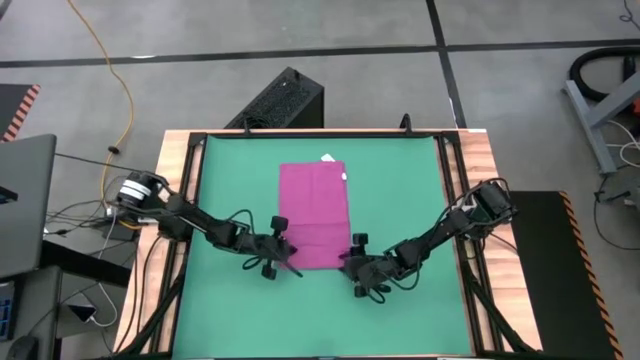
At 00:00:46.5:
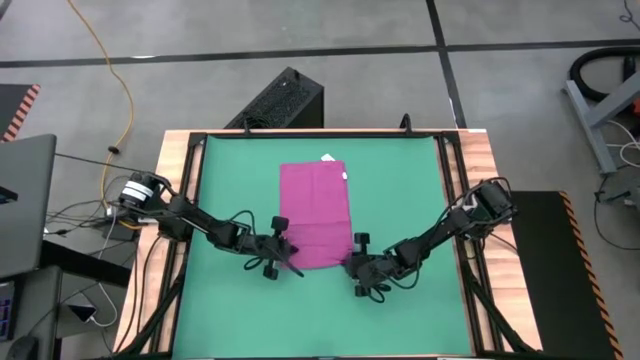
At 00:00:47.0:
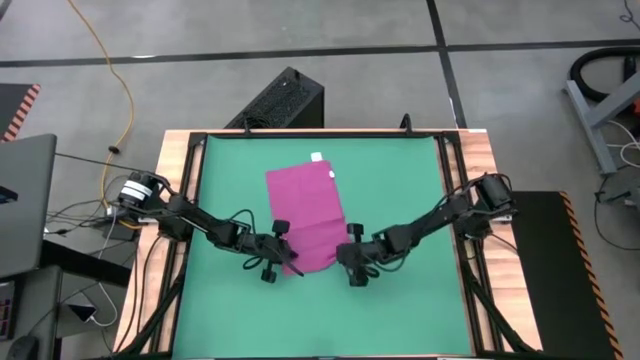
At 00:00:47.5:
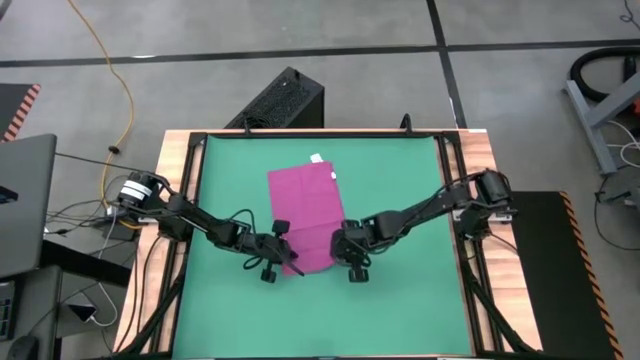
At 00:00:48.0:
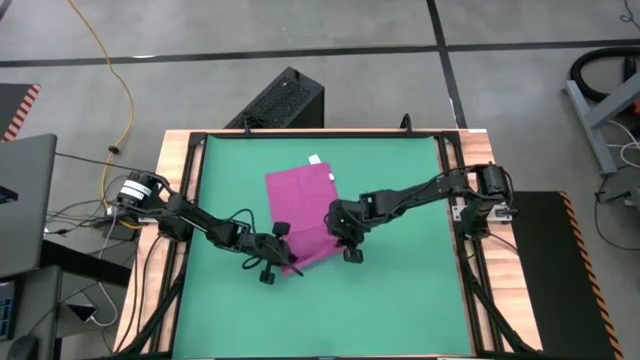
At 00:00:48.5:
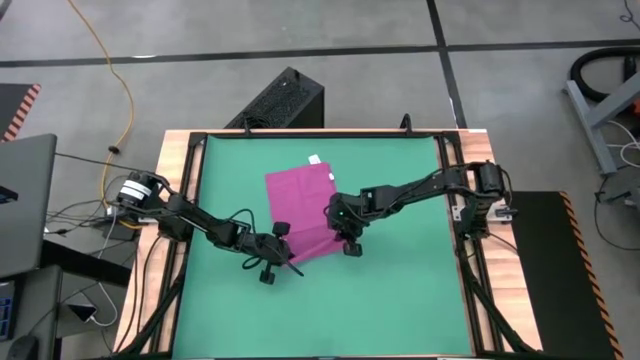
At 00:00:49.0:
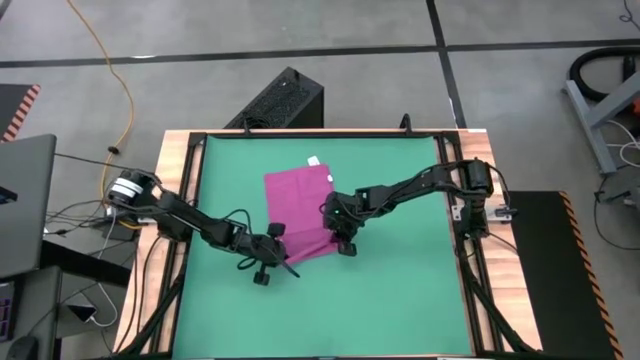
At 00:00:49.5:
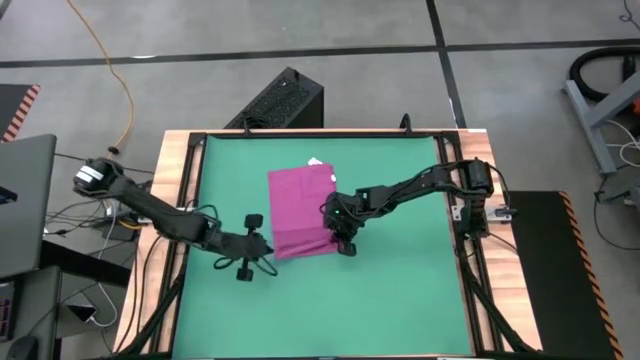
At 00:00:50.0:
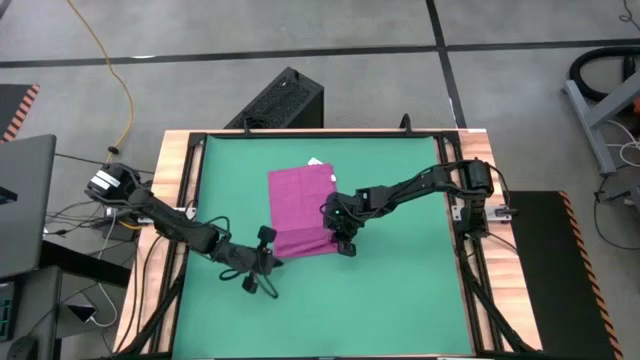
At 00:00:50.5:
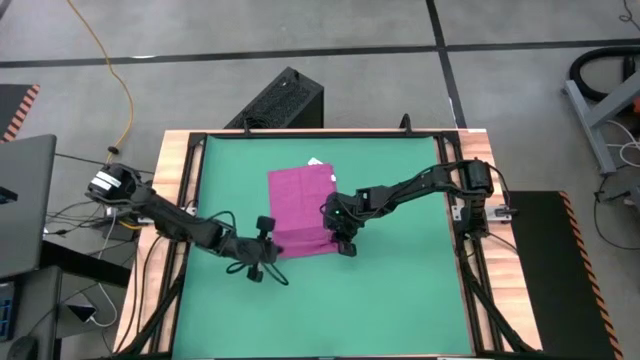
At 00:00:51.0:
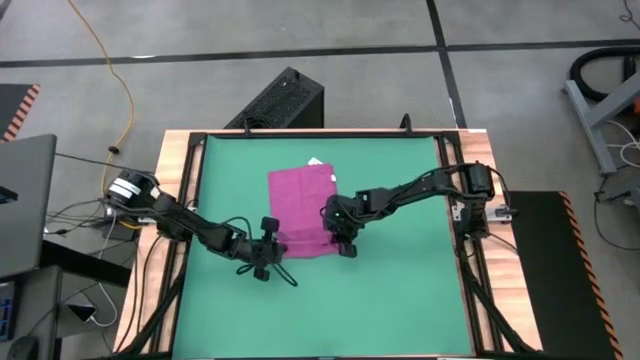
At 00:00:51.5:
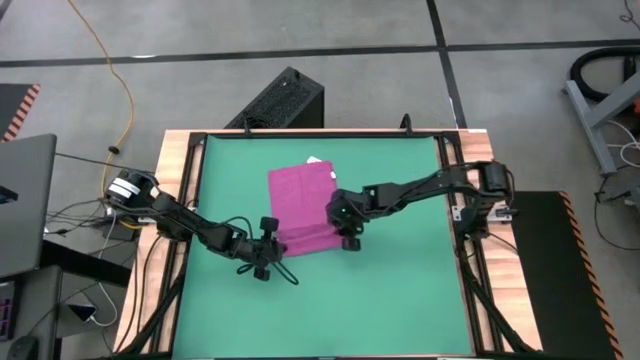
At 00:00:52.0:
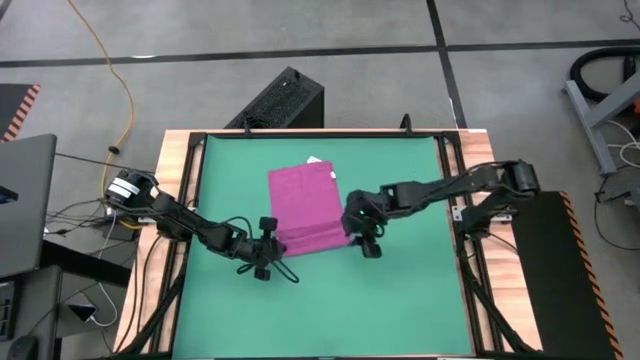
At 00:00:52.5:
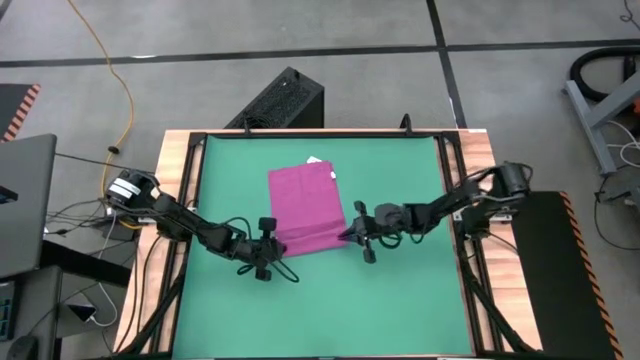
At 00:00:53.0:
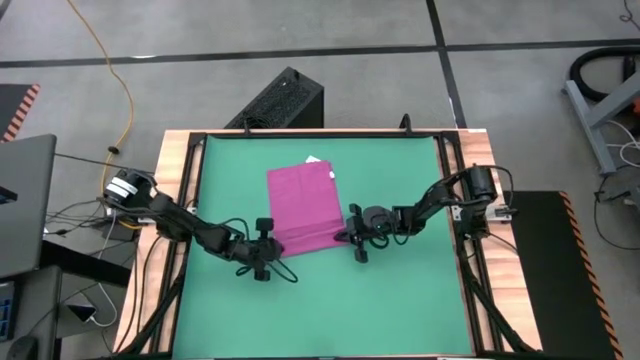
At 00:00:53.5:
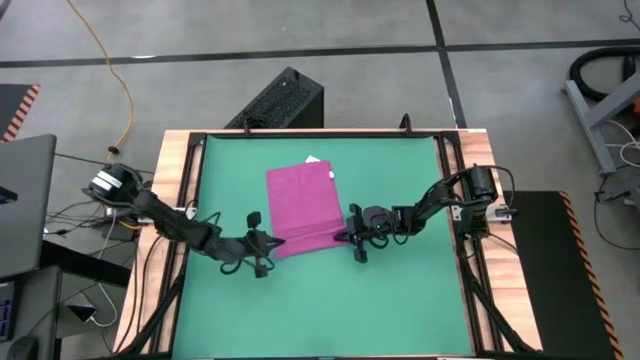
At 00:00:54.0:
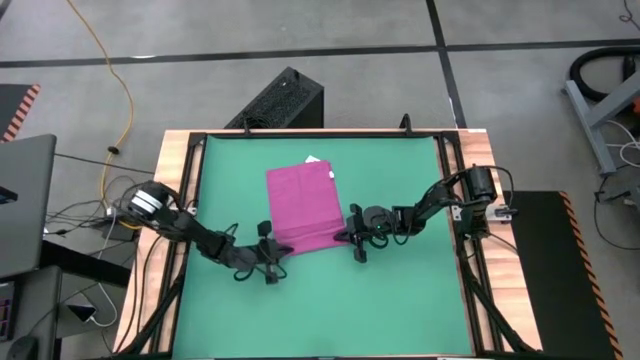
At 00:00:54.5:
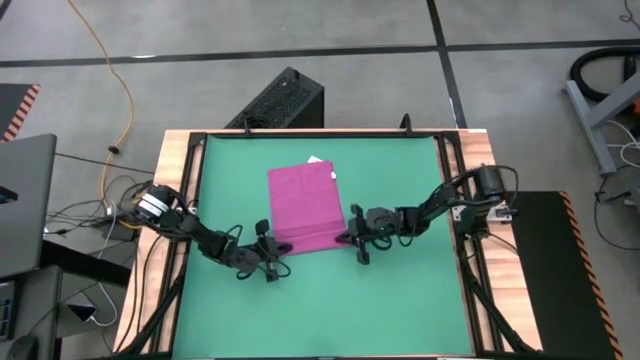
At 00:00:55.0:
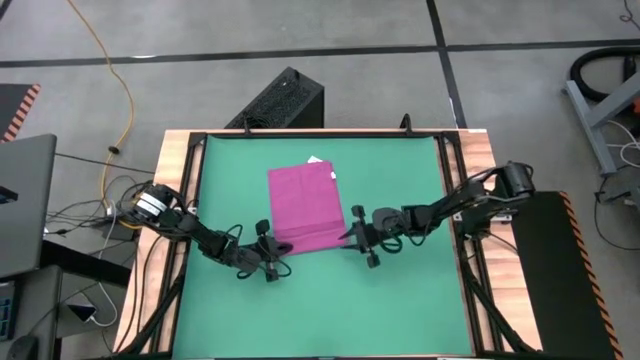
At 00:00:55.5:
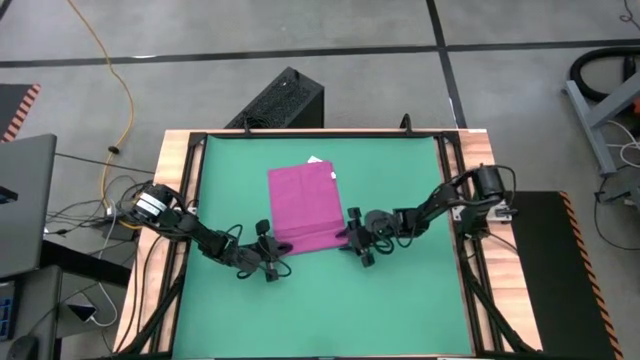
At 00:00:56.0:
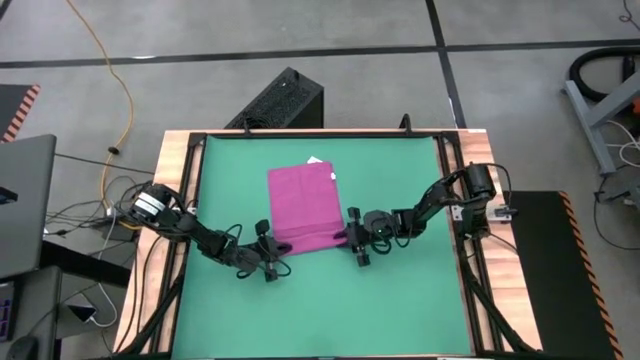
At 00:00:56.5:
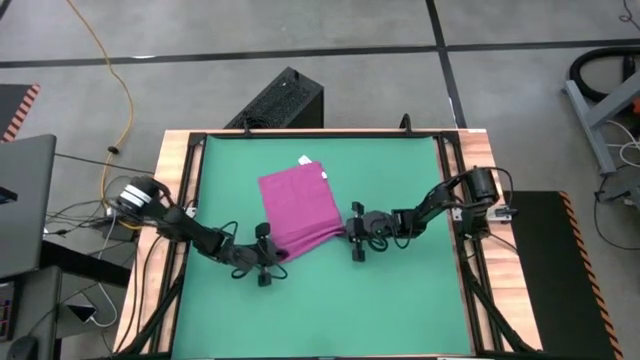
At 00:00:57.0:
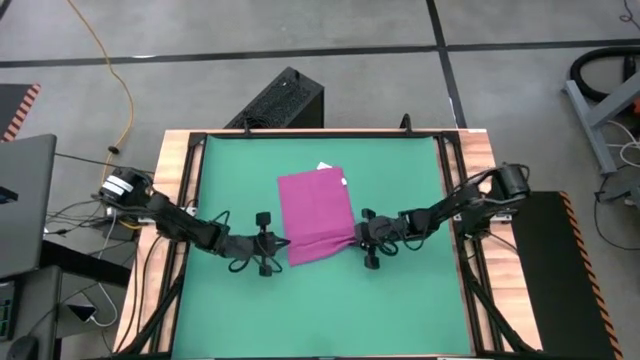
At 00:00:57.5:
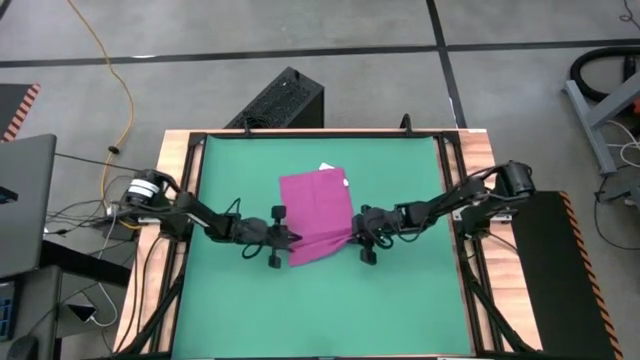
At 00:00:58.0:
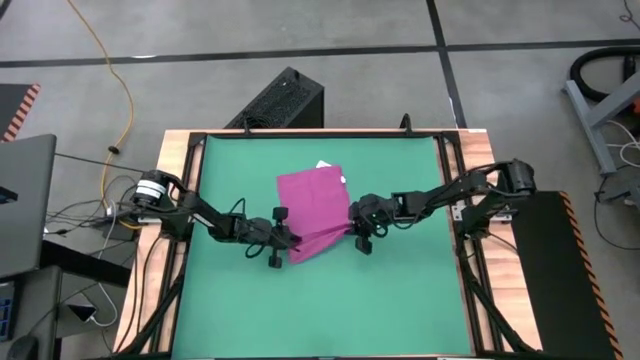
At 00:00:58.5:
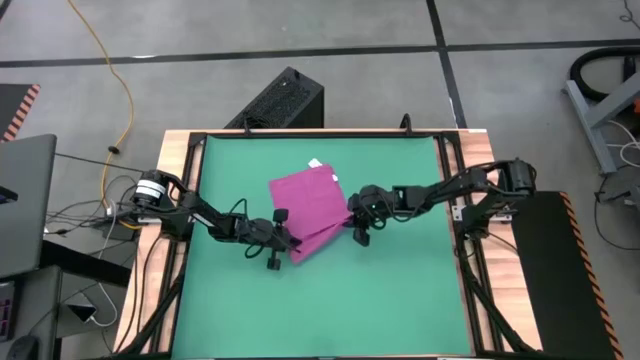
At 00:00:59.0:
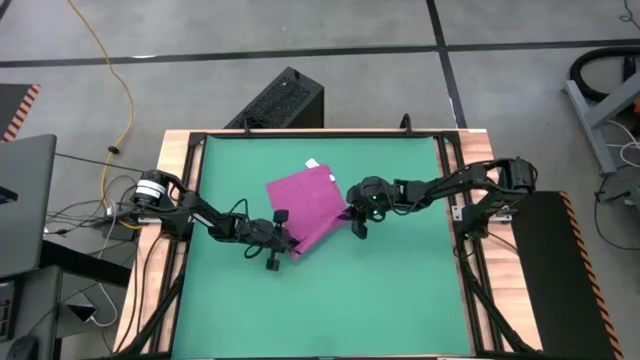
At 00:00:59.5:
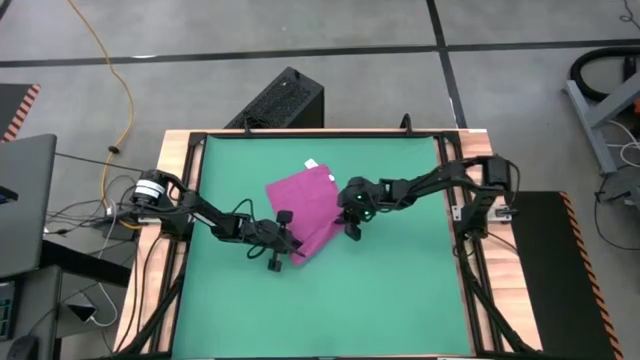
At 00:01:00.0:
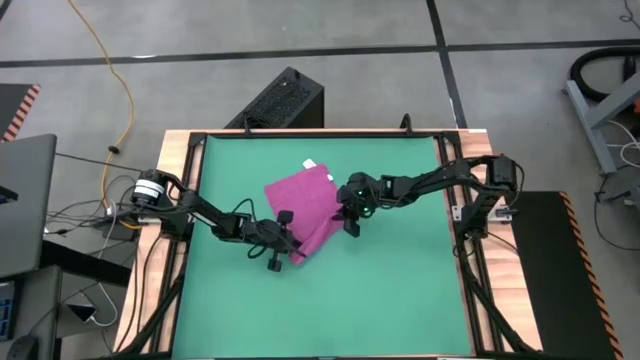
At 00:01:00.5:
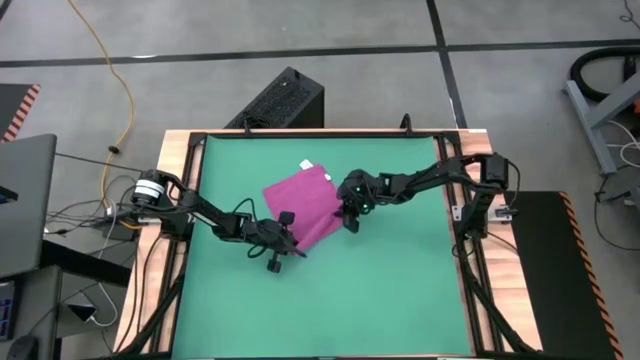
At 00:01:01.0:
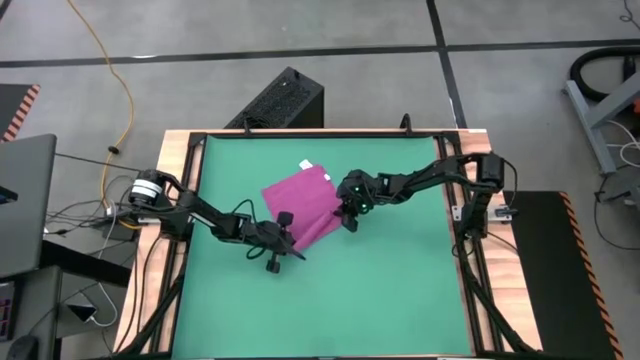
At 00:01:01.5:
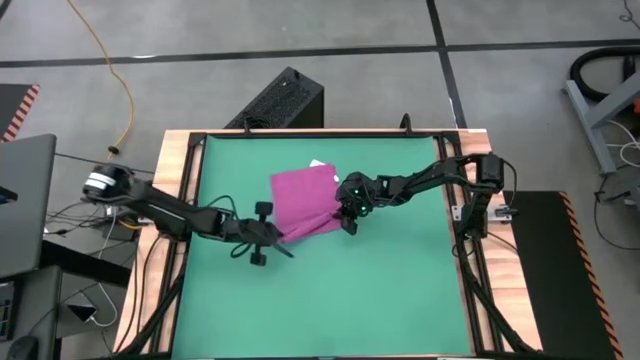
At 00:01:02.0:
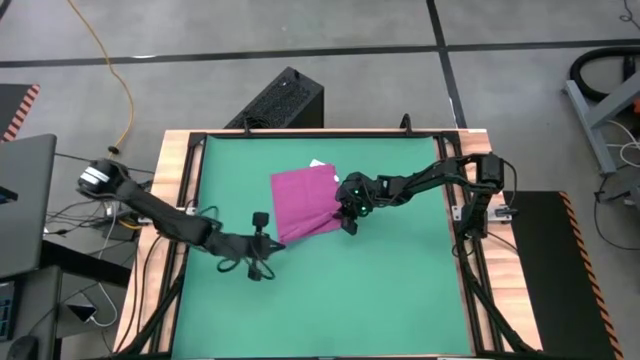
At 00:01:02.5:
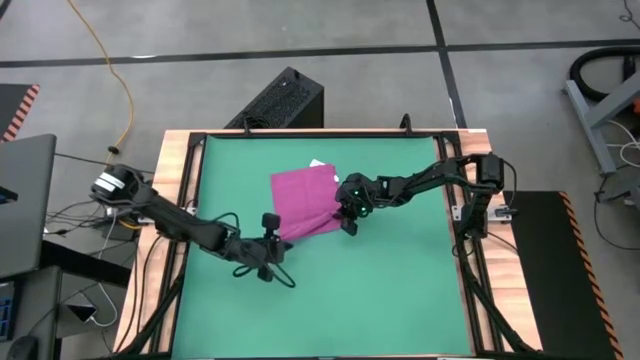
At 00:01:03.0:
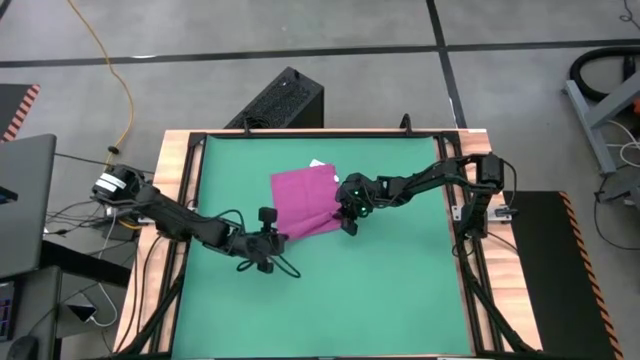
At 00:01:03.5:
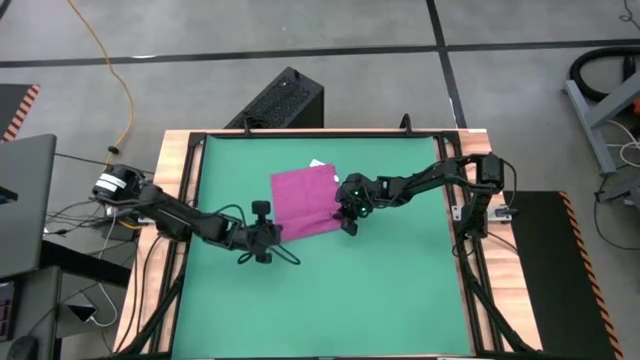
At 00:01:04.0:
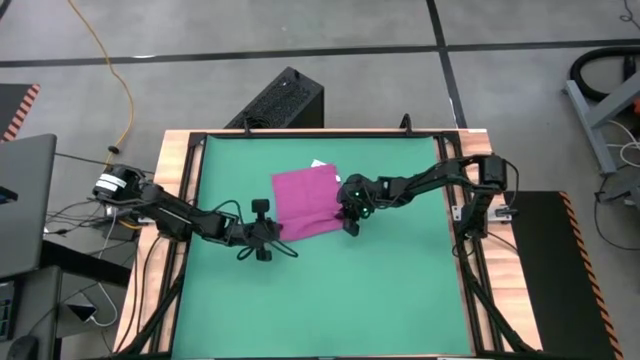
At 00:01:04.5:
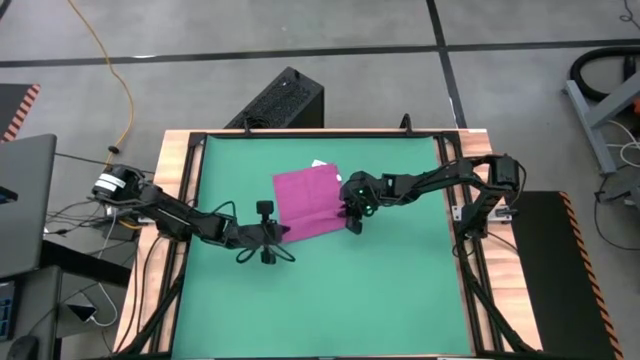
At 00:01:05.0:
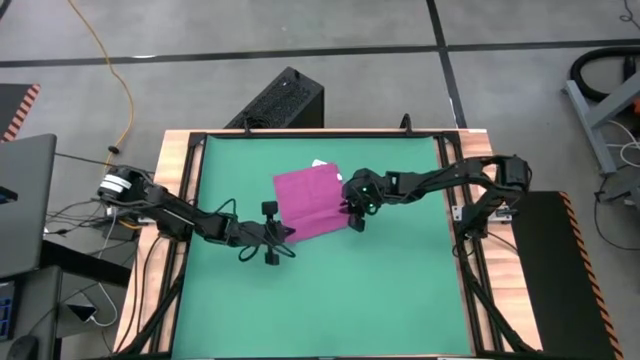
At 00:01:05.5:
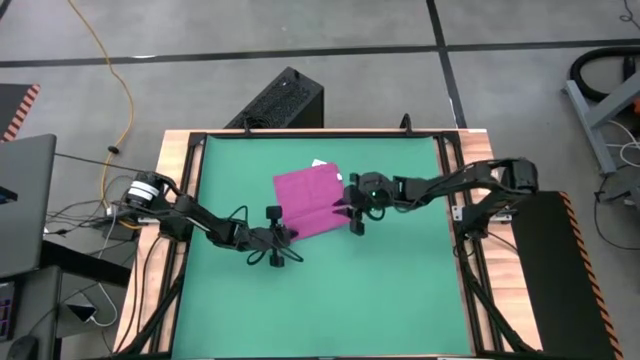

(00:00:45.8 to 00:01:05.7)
Task: Roll towel into tight, uniform cylinder
Roll the pink towel
